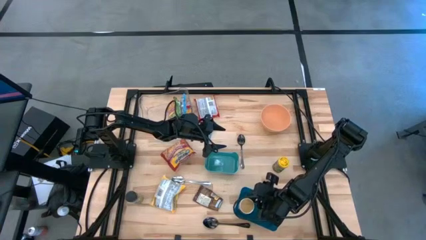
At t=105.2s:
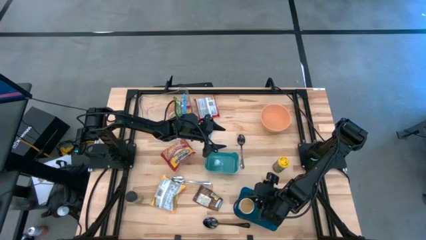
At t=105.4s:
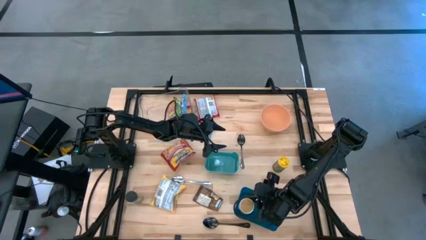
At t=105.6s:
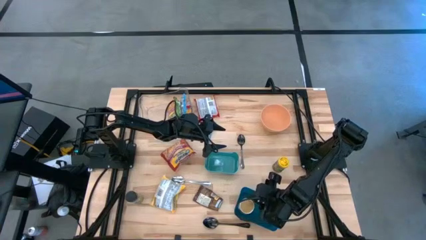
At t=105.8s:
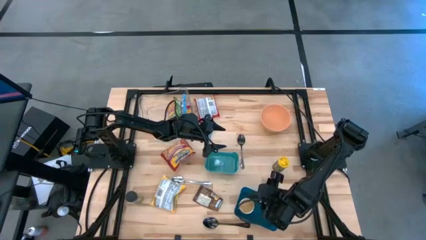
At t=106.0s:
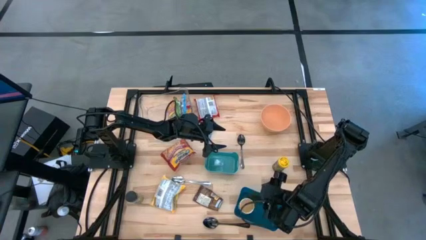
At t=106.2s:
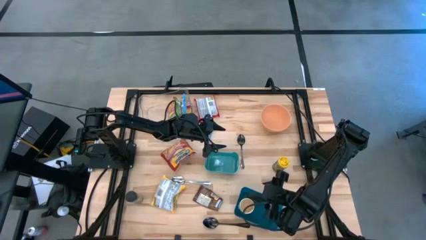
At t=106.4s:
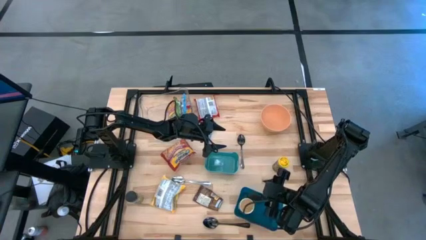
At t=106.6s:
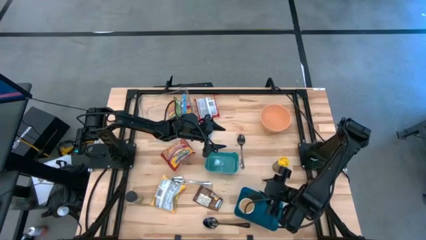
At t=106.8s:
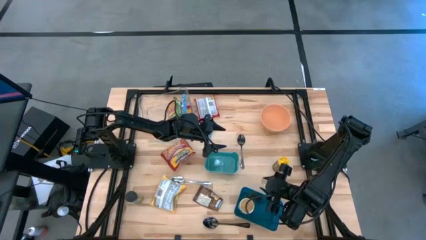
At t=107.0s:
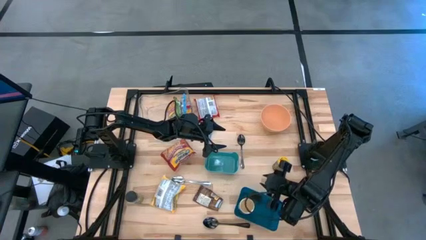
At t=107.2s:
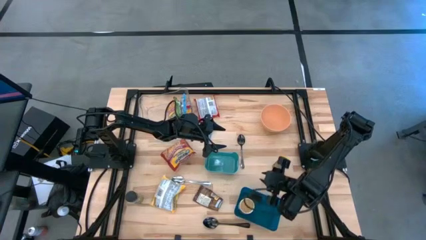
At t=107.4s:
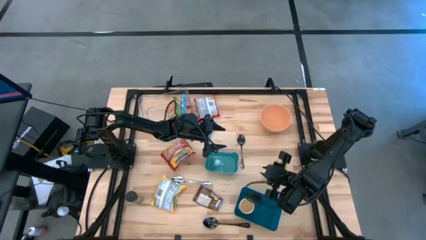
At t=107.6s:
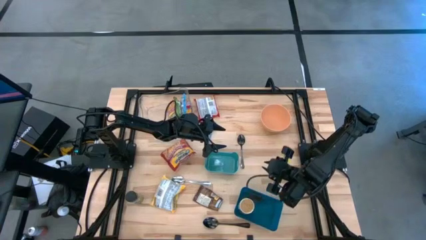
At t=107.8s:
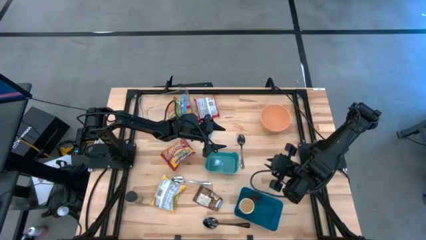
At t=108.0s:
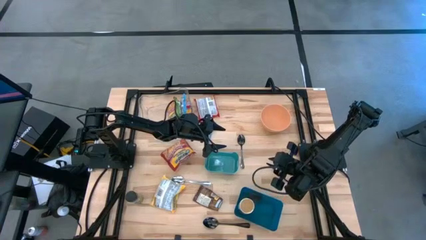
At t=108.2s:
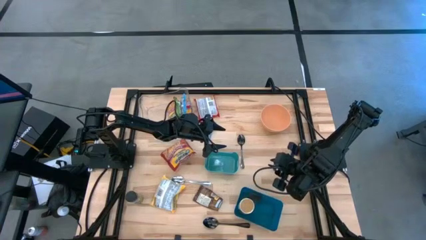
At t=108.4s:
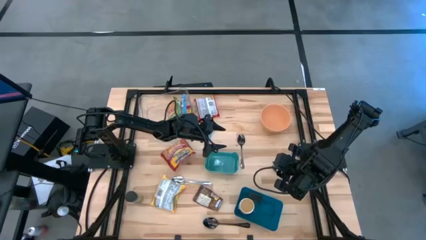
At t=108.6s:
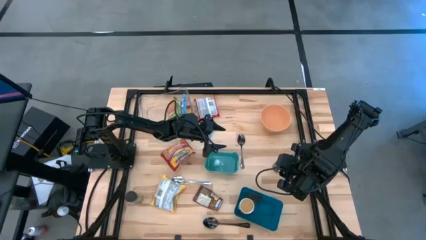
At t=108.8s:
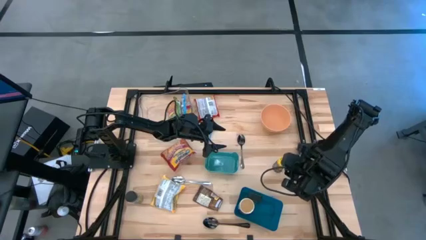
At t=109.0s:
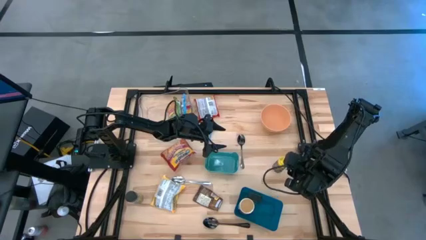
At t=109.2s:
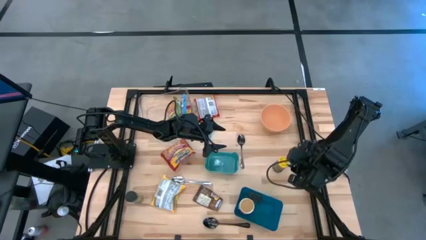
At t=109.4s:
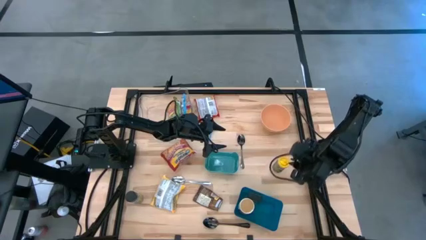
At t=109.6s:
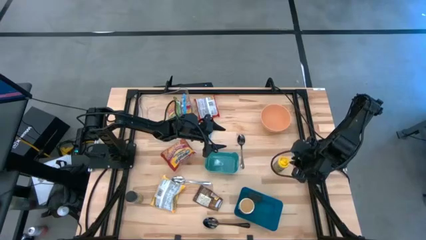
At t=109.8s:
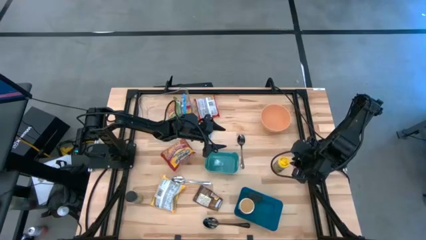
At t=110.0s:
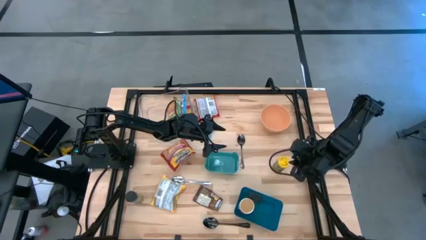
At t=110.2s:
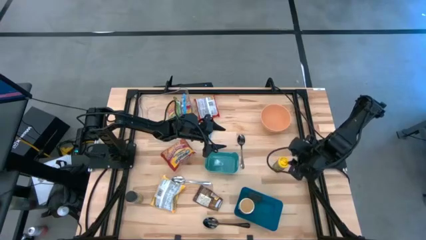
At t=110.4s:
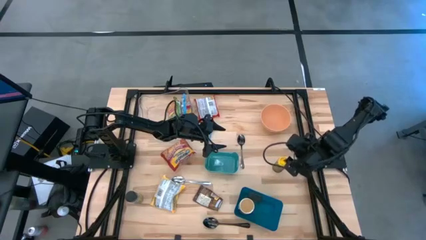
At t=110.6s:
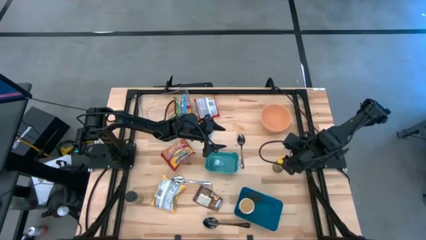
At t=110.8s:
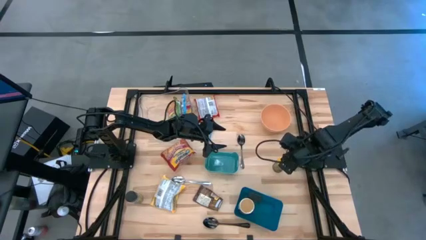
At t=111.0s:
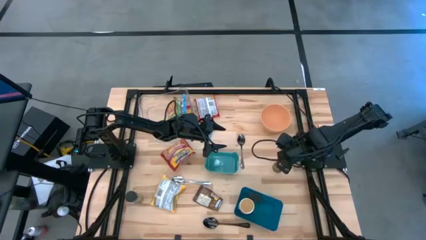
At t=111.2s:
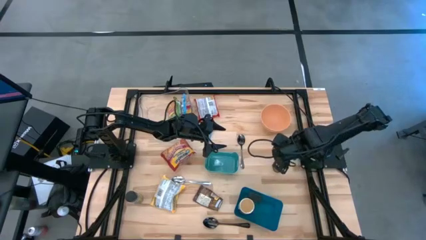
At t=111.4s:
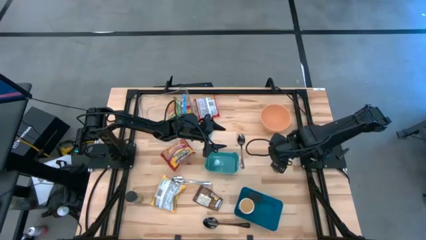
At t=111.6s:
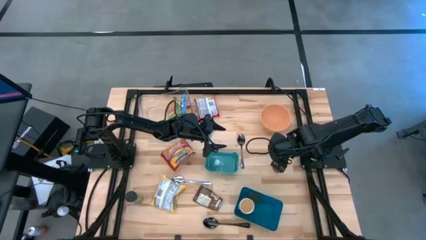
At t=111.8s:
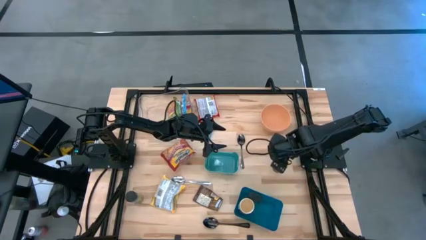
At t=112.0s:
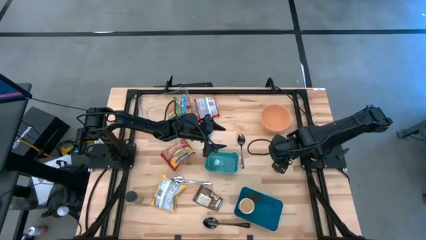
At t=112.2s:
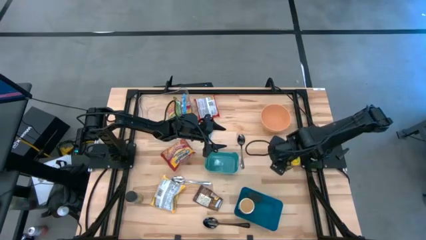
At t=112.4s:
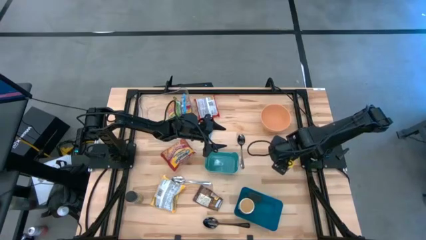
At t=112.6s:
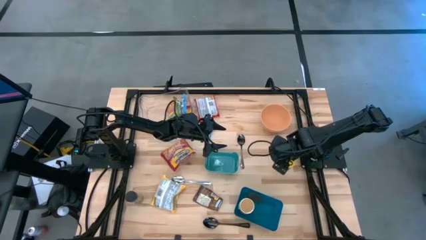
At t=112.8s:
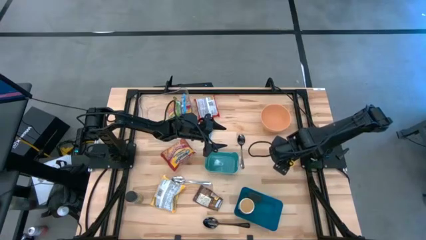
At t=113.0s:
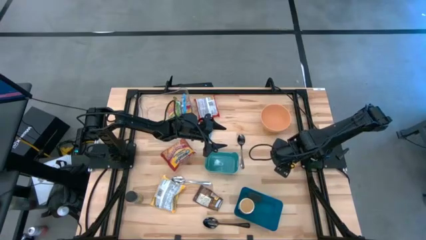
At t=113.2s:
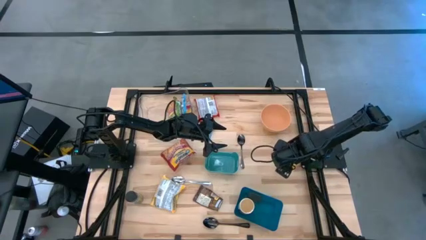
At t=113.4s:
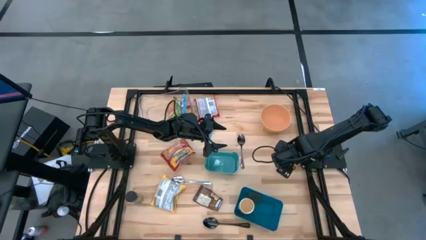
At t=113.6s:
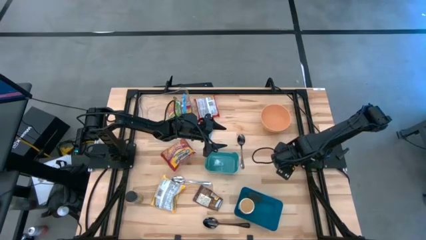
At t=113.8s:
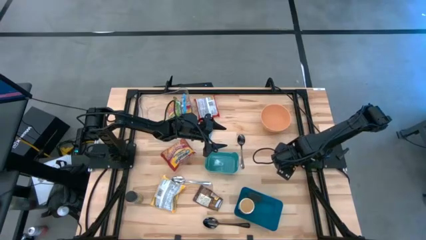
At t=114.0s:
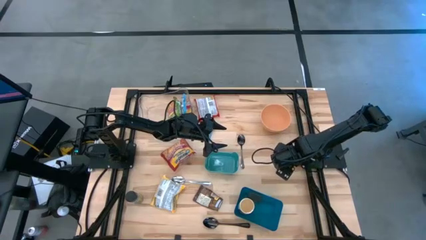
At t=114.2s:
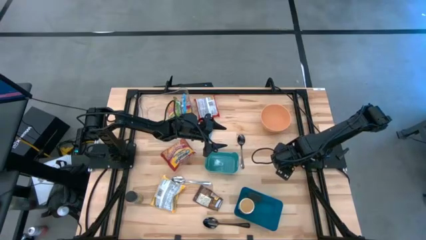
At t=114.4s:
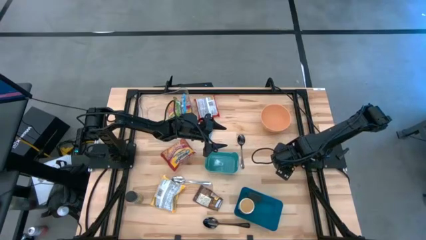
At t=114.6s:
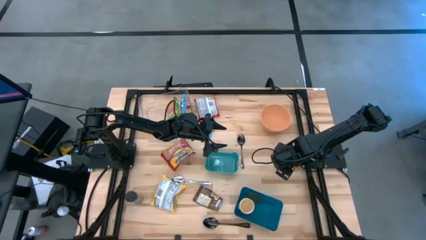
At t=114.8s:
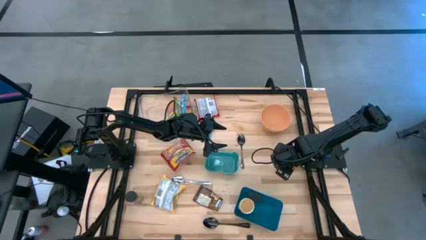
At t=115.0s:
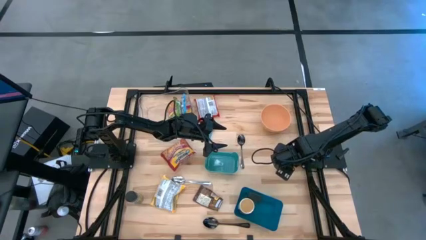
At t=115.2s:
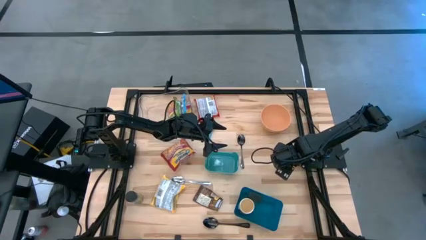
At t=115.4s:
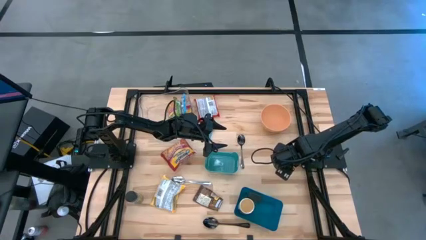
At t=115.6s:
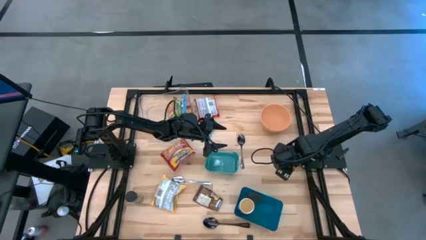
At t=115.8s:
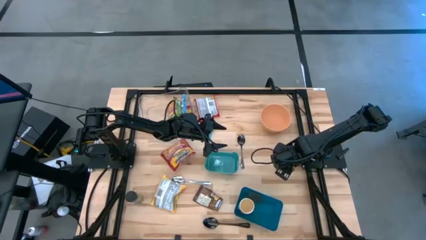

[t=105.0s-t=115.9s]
Task: Pick & Place Food Item
Put the yellow seasoning bottle into the blue bin
